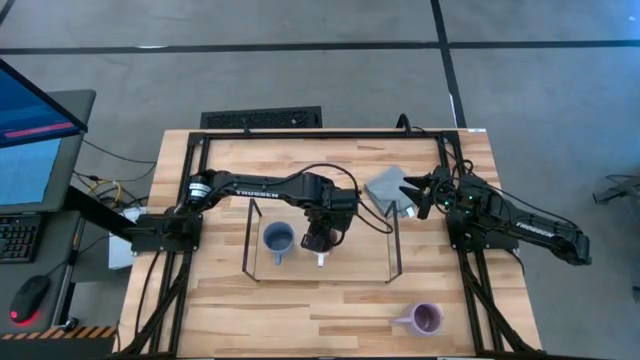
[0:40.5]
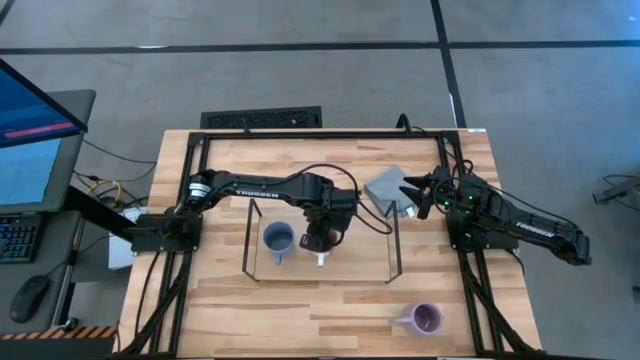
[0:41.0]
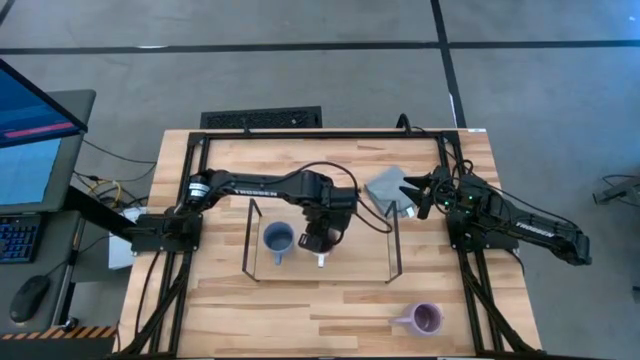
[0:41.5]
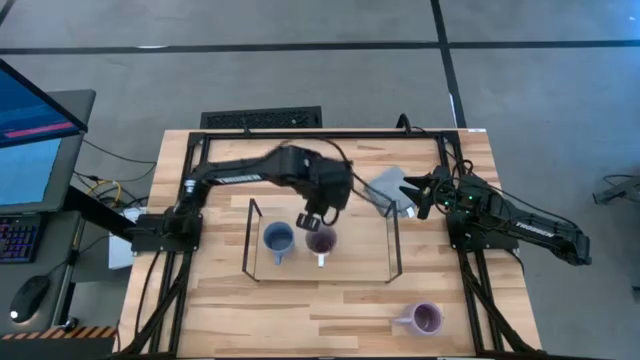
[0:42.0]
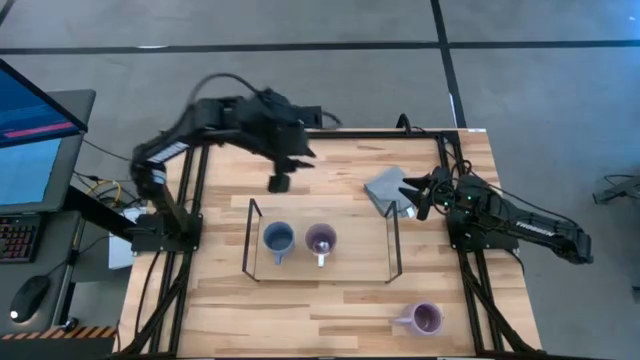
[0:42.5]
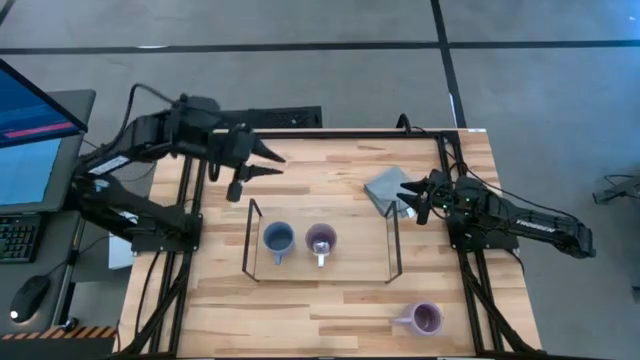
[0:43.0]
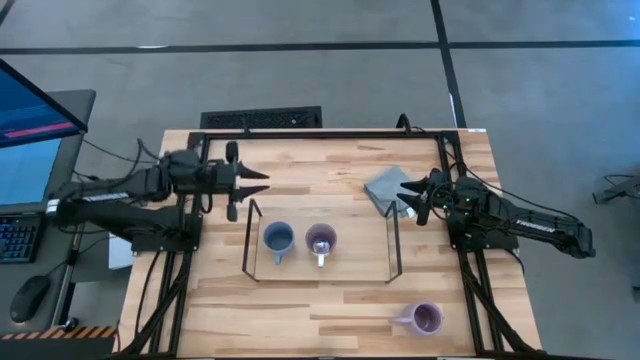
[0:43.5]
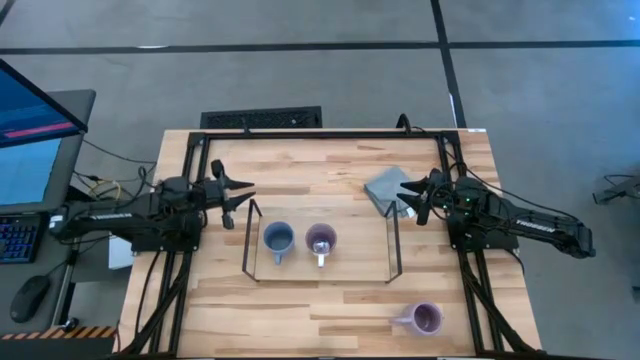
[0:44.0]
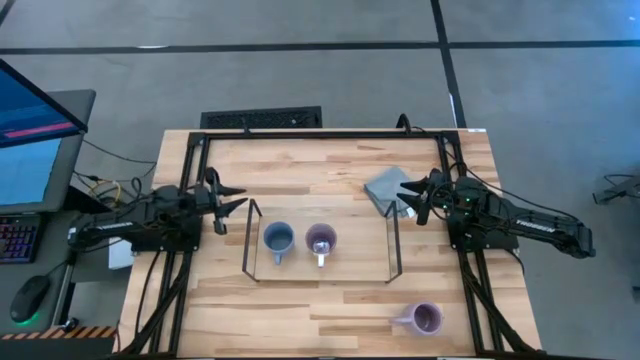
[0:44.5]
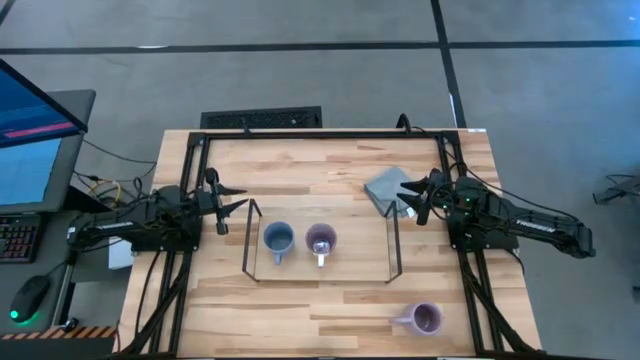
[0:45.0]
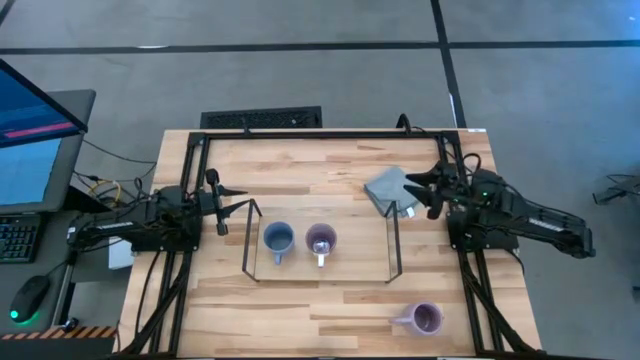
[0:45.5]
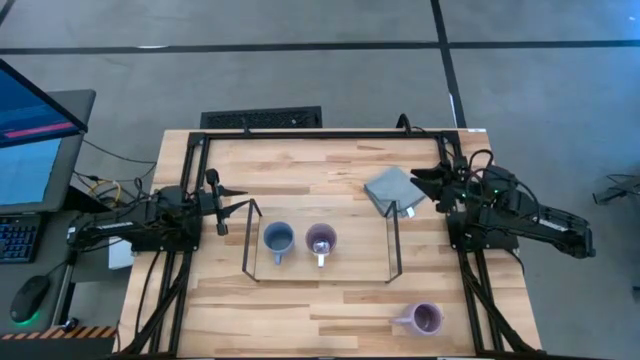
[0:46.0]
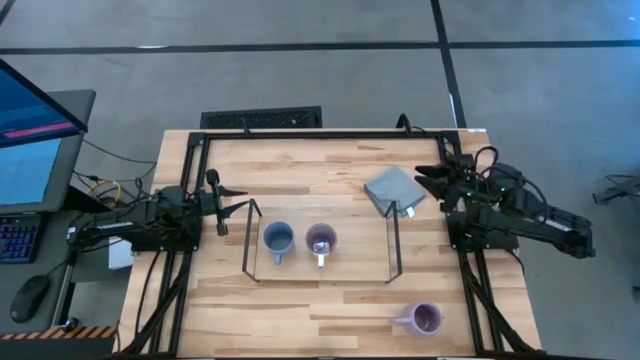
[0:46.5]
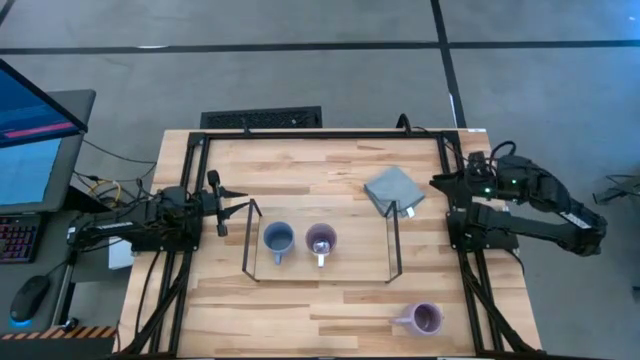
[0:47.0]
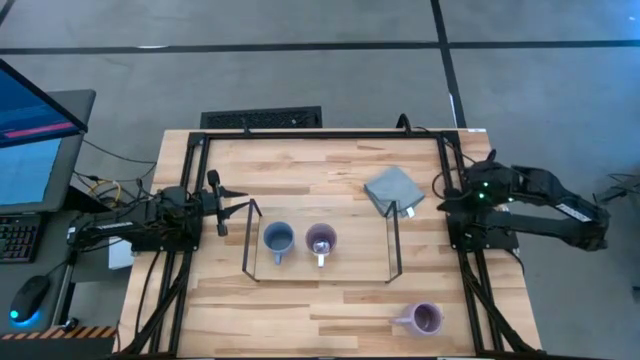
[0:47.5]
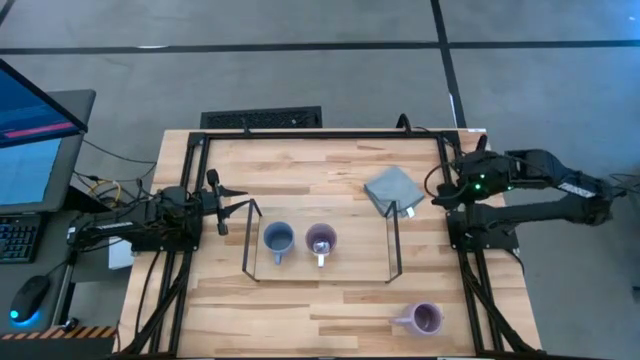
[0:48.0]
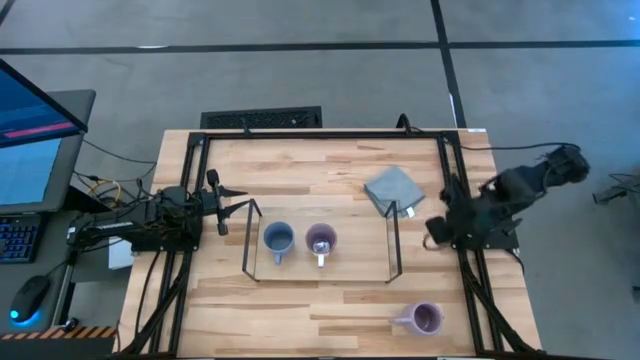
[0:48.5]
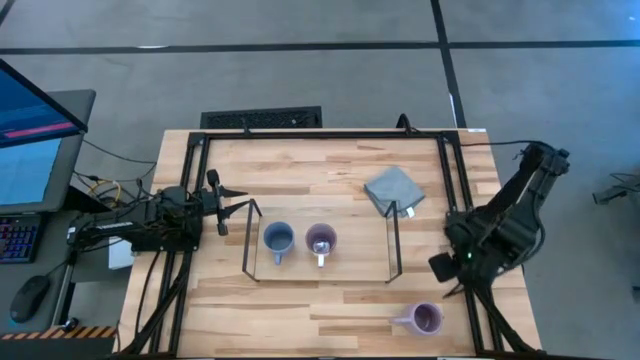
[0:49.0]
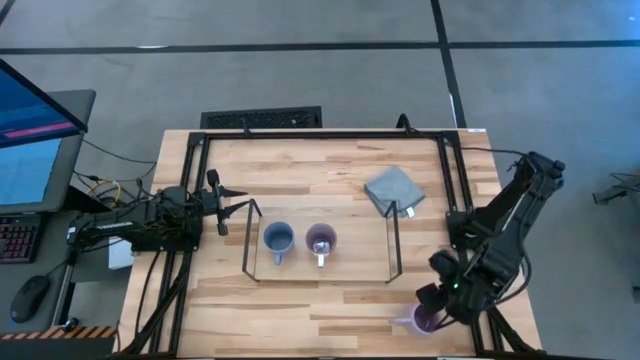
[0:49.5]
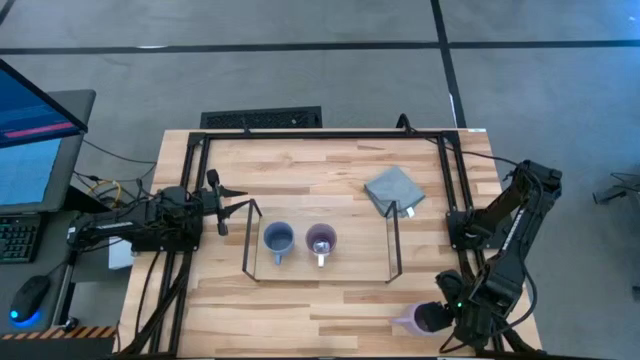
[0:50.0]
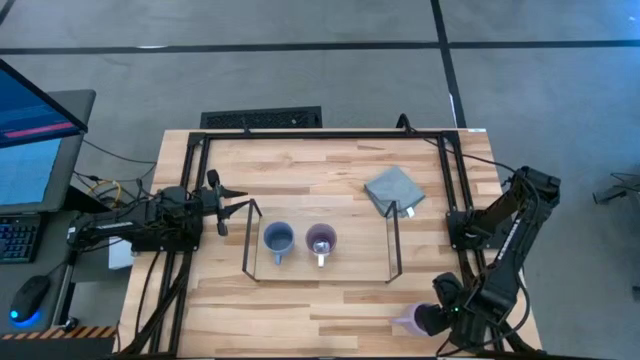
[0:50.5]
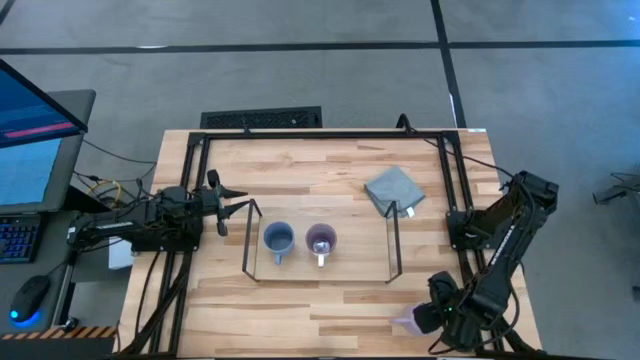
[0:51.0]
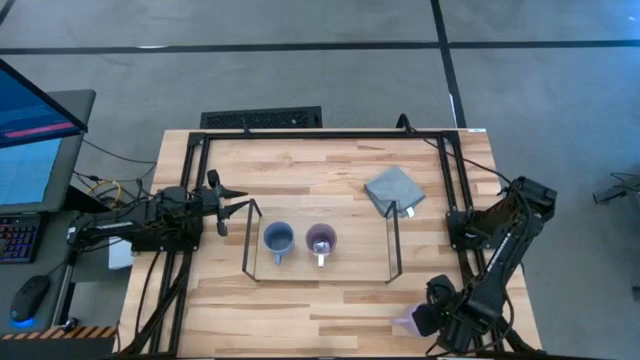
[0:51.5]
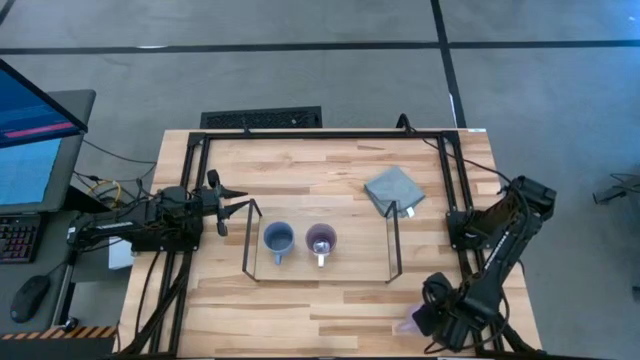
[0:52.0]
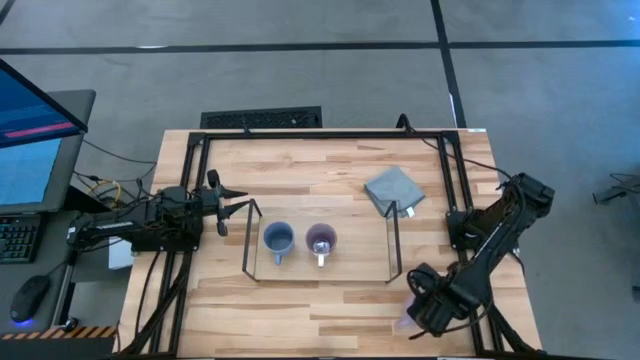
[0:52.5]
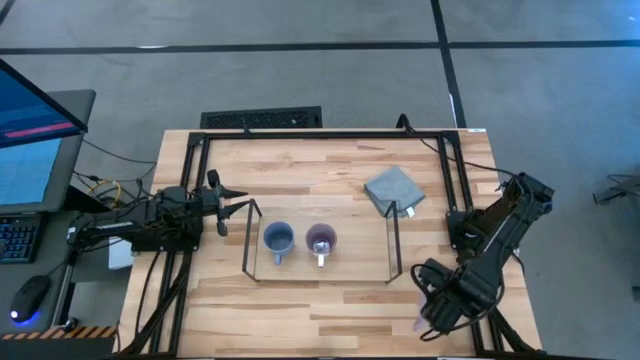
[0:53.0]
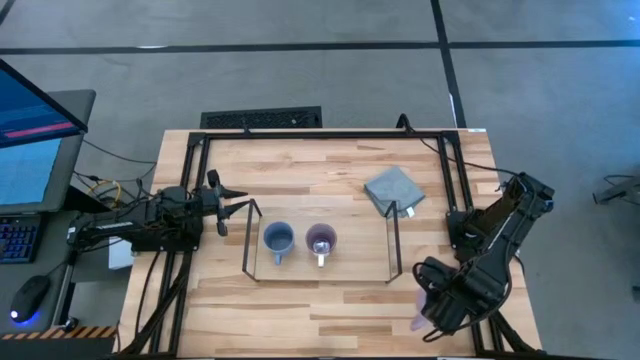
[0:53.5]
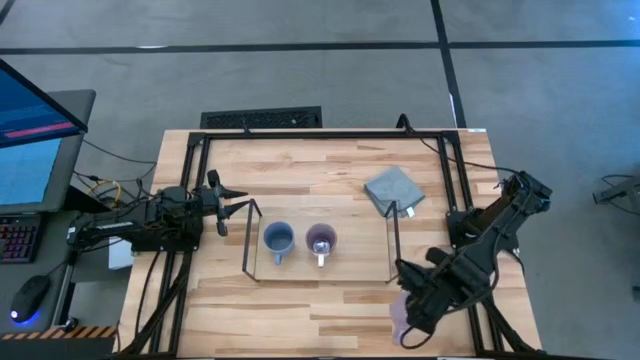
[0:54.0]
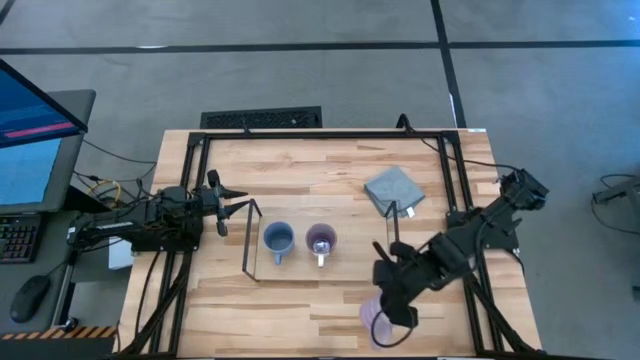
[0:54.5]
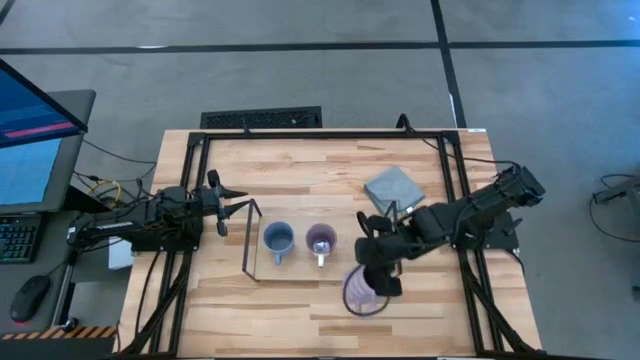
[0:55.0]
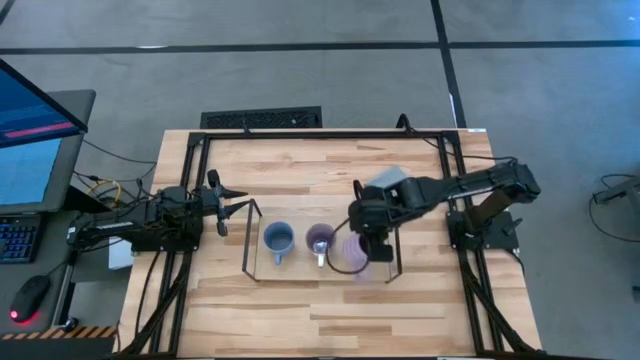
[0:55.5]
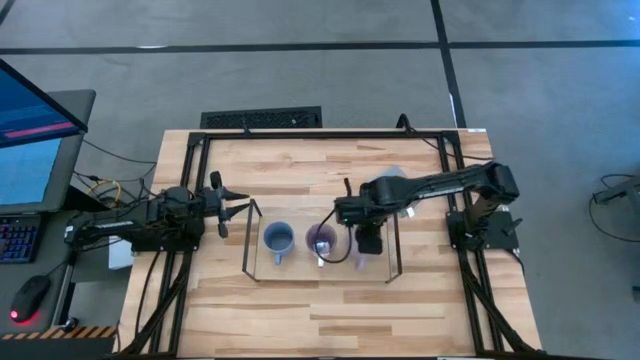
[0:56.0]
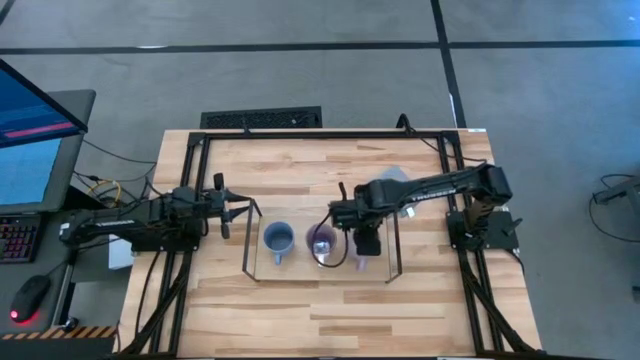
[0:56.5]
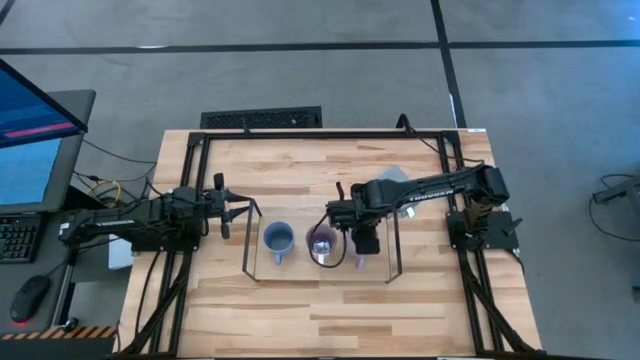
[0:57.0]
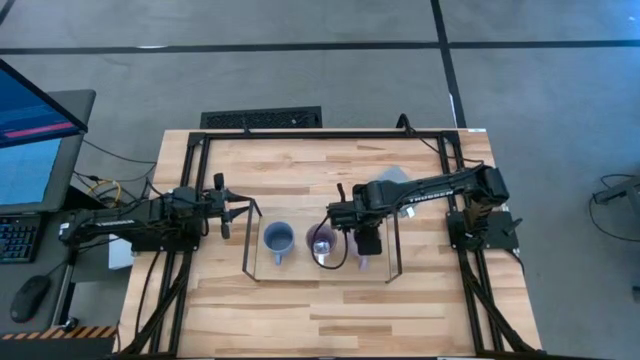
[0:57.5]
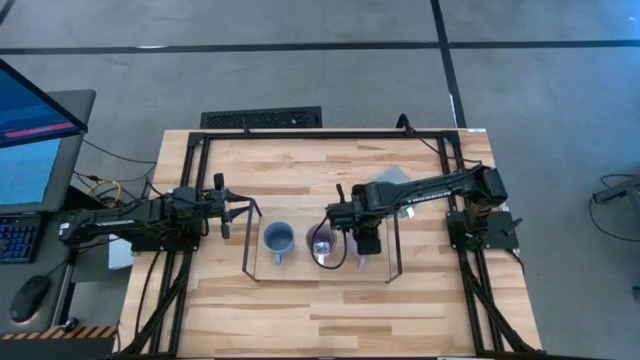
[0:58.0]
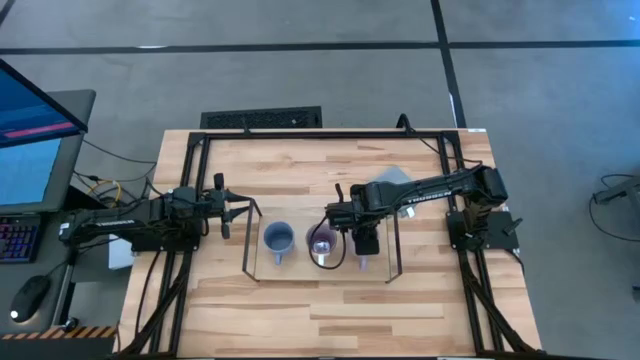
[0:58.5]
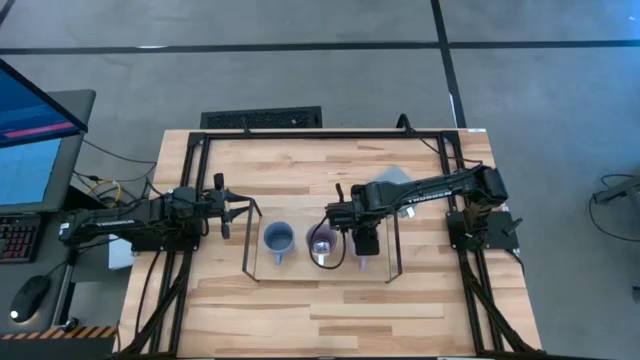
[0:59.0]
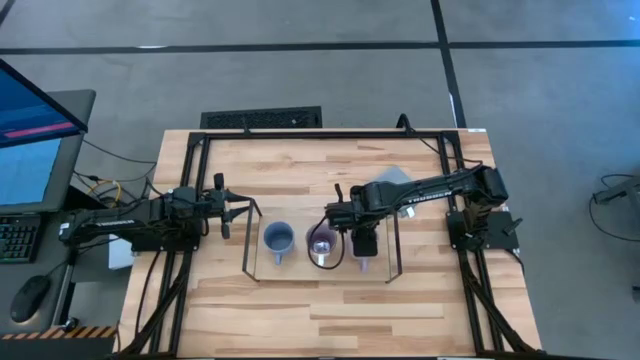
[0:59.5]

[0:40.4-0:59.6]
Task: Stack small to large cups/mugs on shelf
Put the purple mug on the shelf

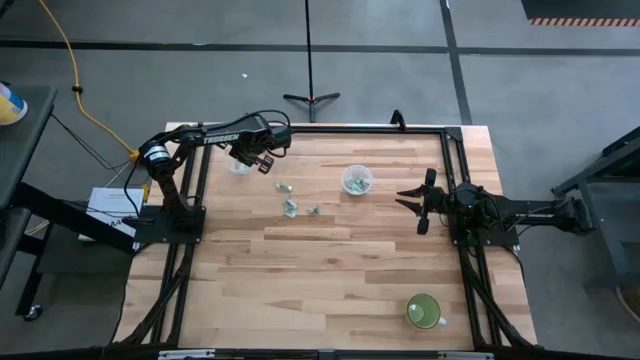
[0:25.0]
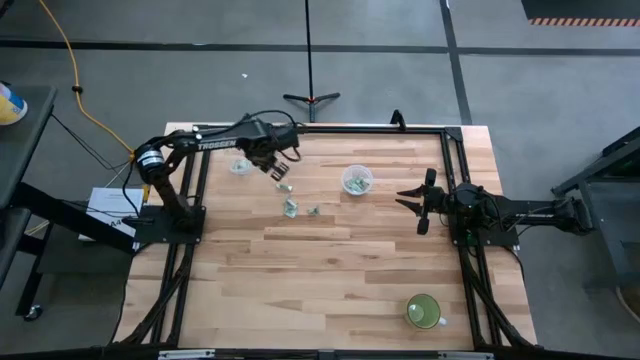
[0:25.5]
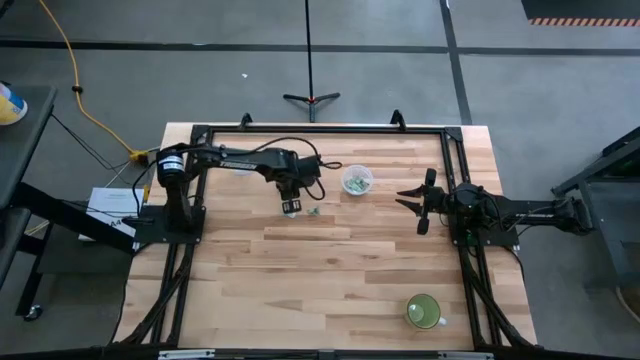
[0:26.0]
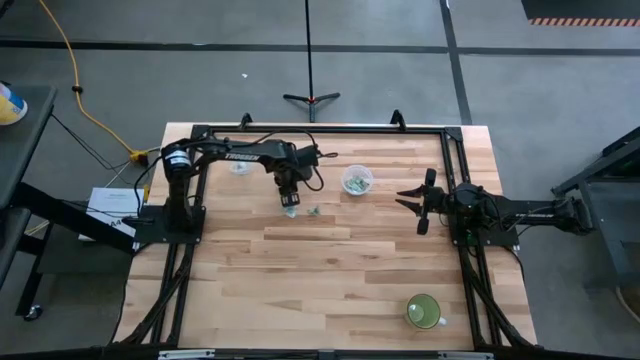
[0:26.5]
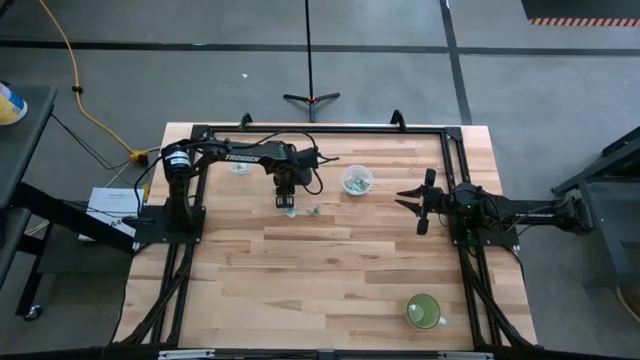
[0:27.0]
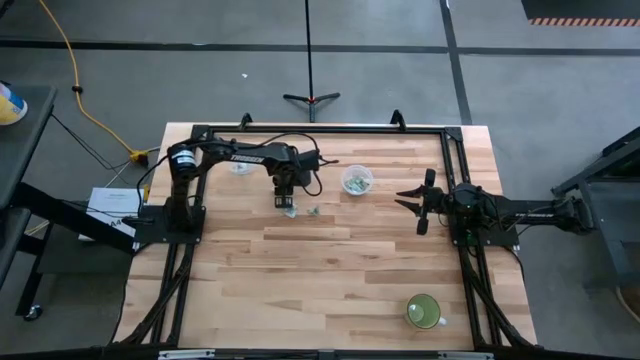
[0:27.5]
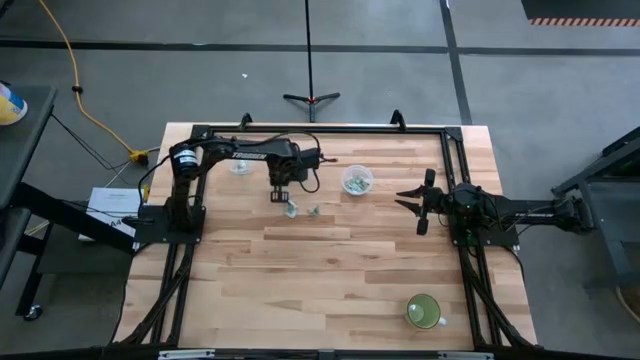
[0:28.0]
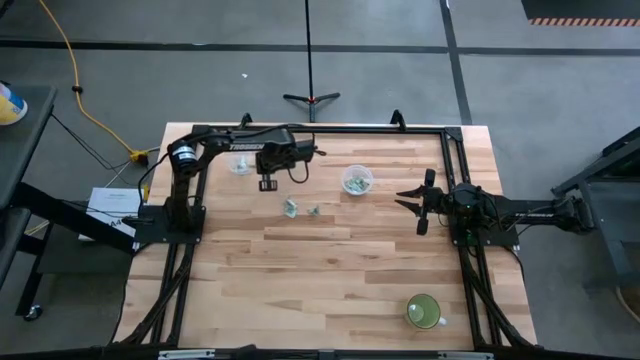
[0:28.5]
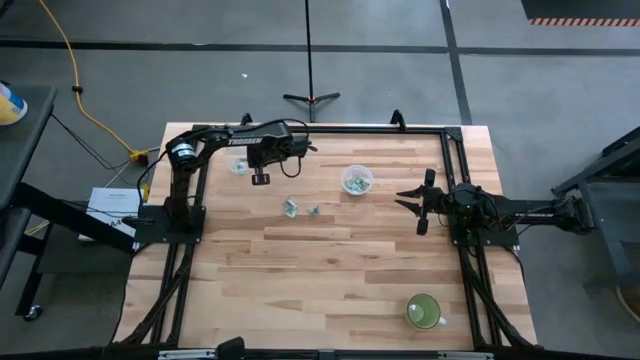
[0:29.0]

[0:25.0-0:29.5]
Task: Pick and place Stevia / Truvia into bins
Put the stevia packet into the top transparent container
